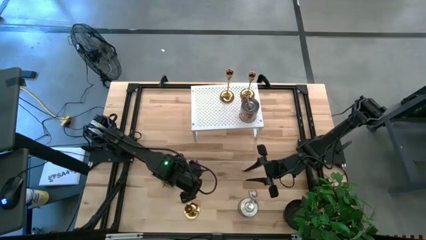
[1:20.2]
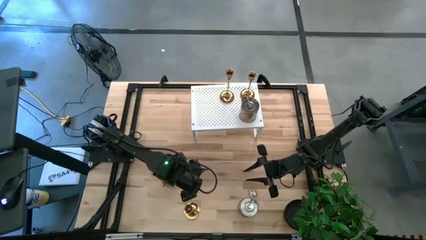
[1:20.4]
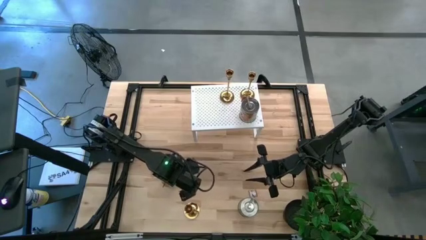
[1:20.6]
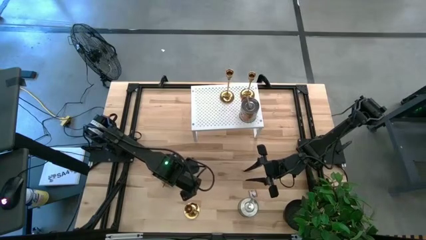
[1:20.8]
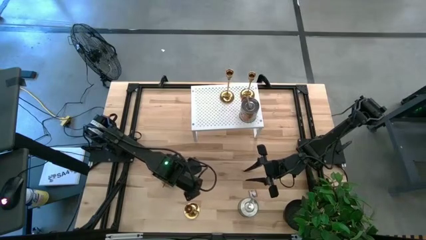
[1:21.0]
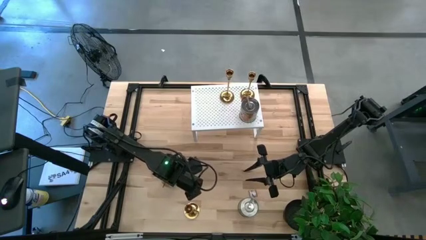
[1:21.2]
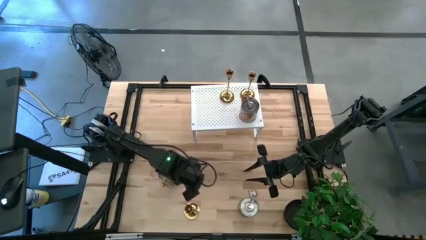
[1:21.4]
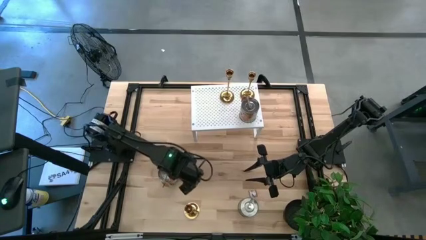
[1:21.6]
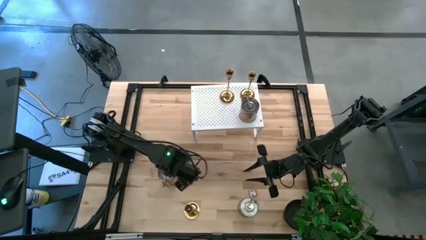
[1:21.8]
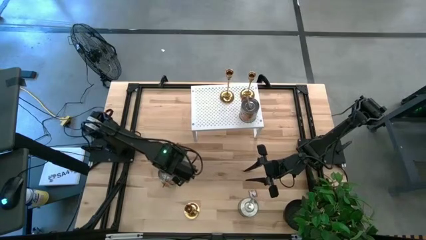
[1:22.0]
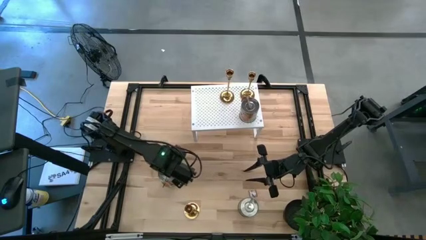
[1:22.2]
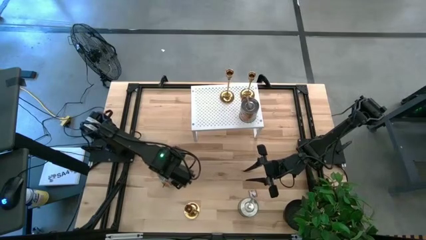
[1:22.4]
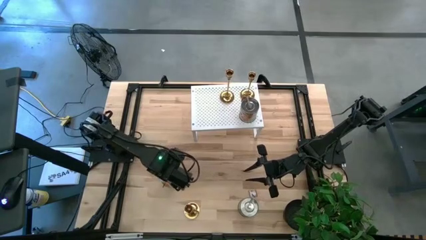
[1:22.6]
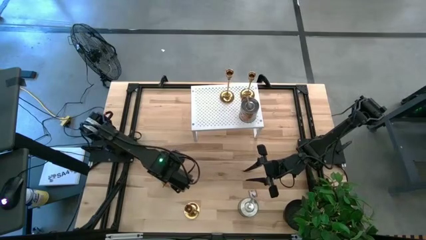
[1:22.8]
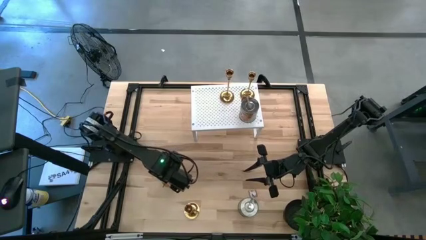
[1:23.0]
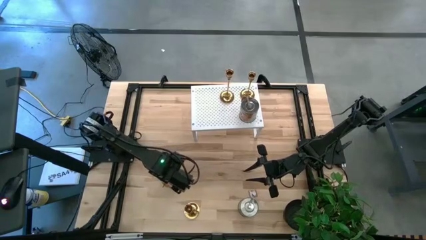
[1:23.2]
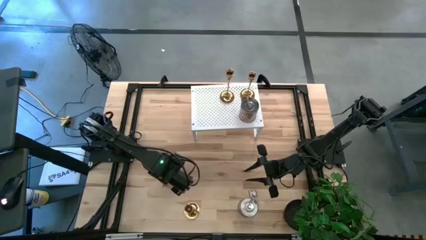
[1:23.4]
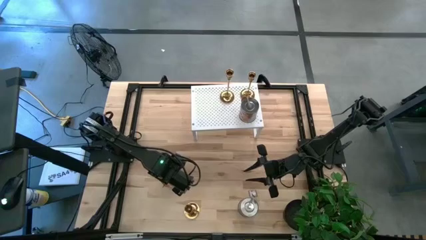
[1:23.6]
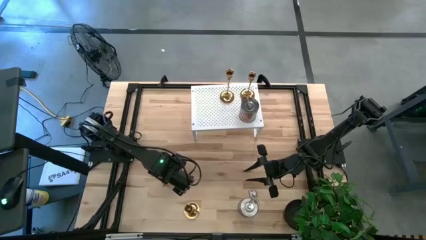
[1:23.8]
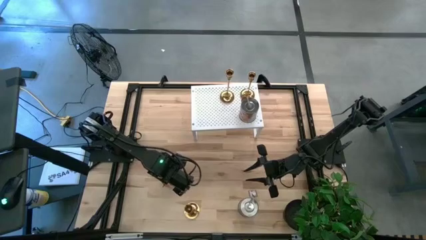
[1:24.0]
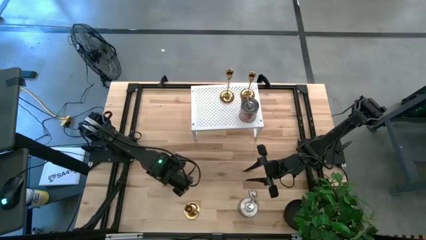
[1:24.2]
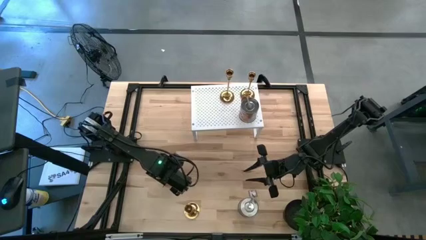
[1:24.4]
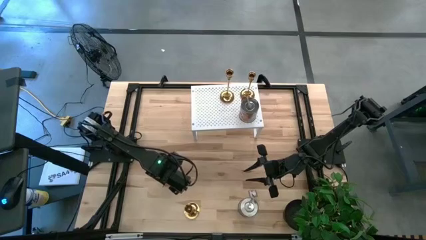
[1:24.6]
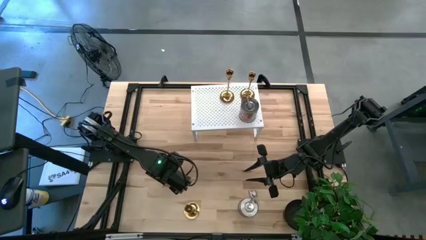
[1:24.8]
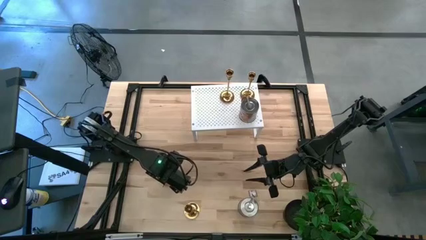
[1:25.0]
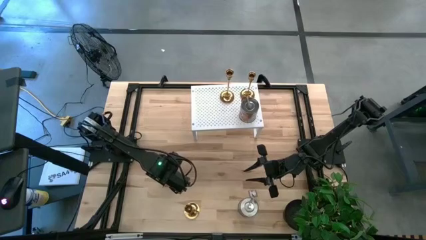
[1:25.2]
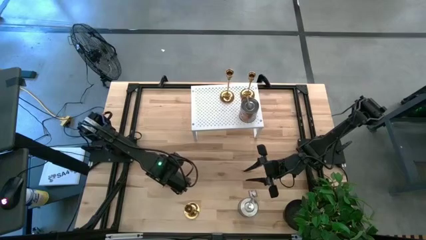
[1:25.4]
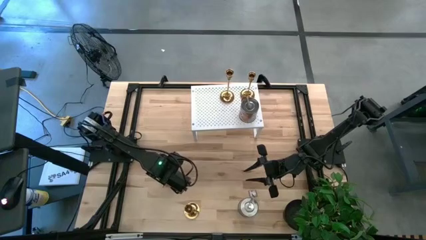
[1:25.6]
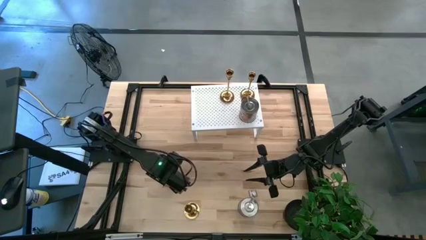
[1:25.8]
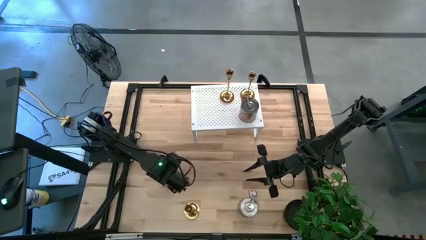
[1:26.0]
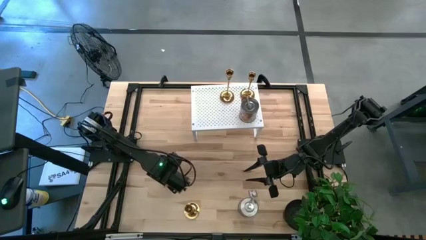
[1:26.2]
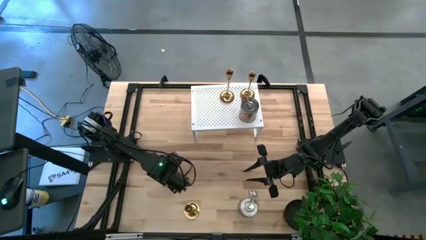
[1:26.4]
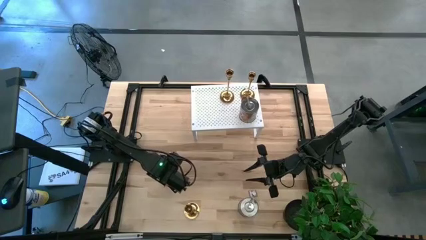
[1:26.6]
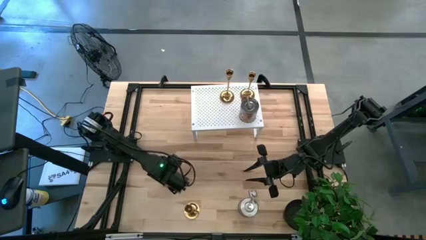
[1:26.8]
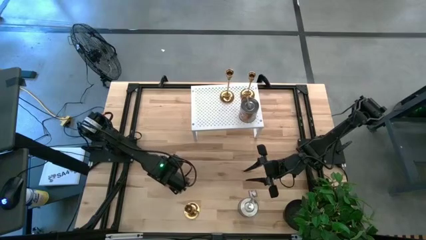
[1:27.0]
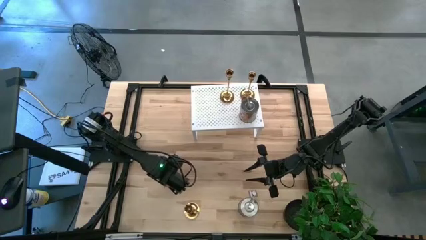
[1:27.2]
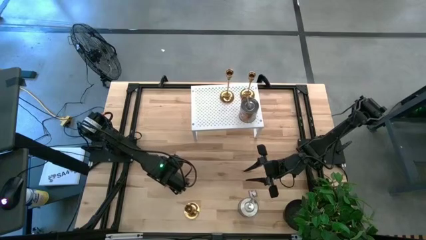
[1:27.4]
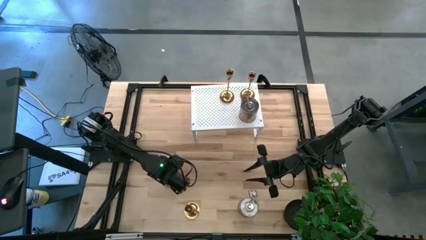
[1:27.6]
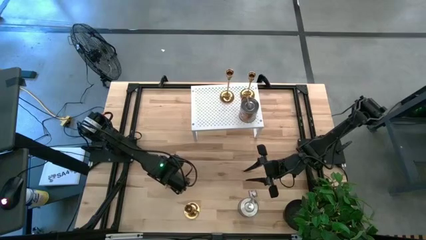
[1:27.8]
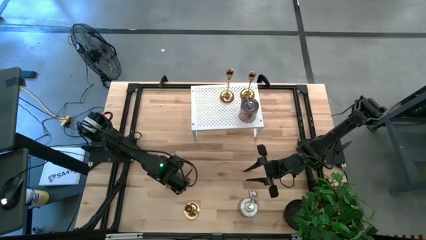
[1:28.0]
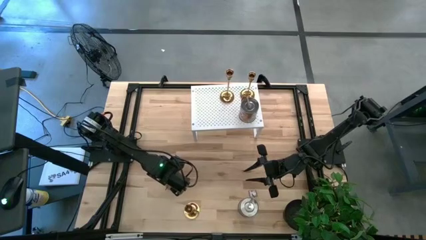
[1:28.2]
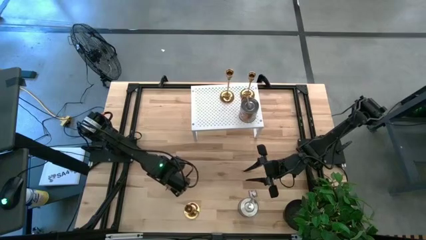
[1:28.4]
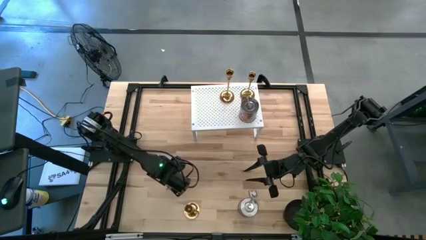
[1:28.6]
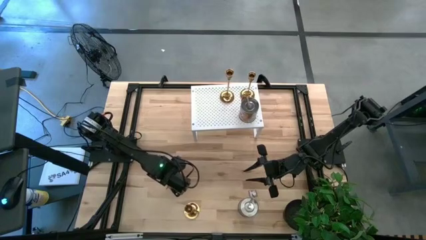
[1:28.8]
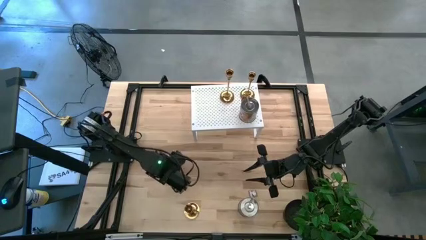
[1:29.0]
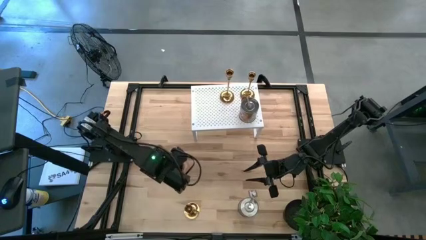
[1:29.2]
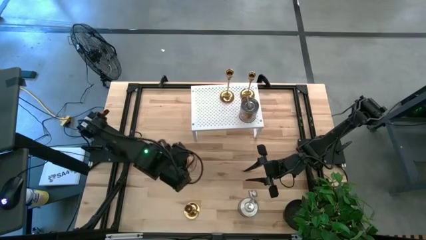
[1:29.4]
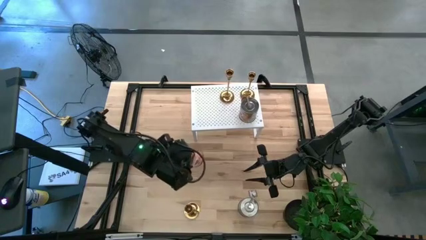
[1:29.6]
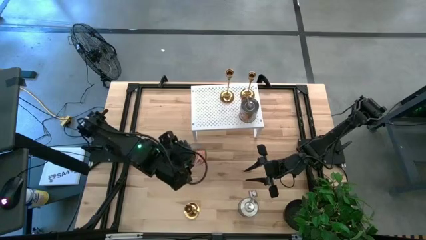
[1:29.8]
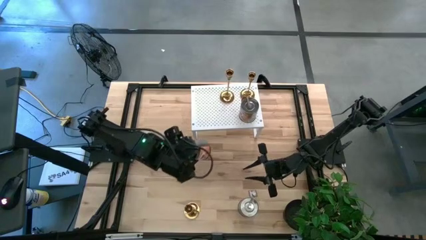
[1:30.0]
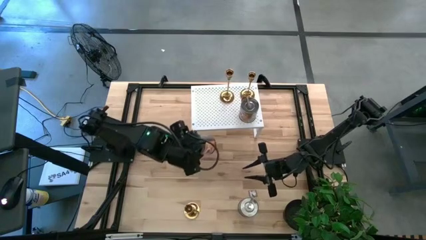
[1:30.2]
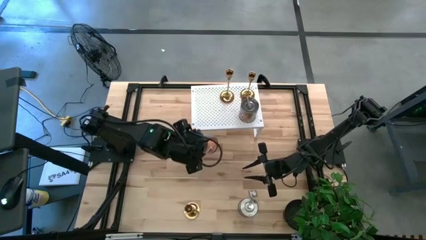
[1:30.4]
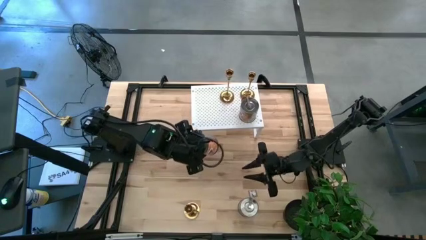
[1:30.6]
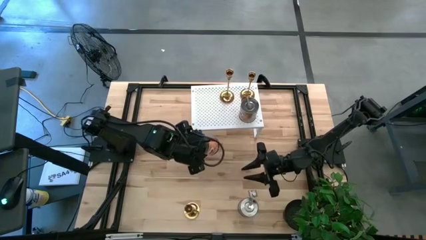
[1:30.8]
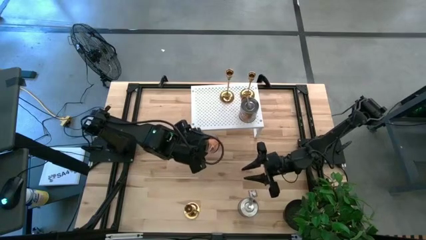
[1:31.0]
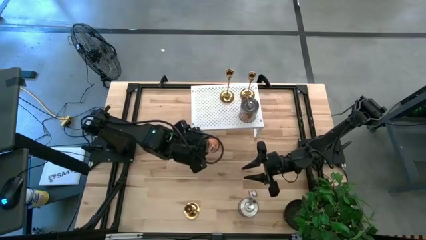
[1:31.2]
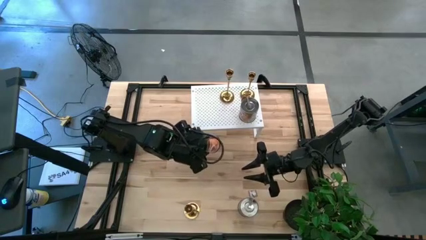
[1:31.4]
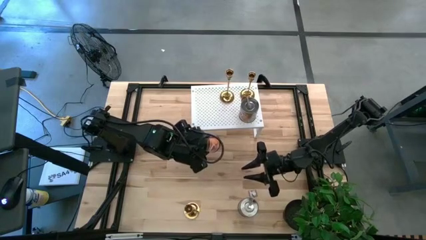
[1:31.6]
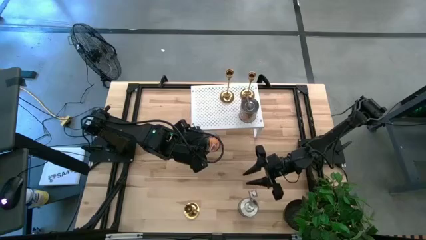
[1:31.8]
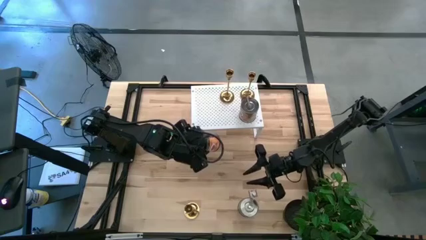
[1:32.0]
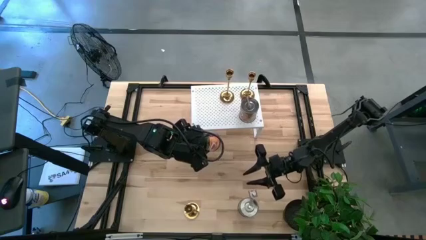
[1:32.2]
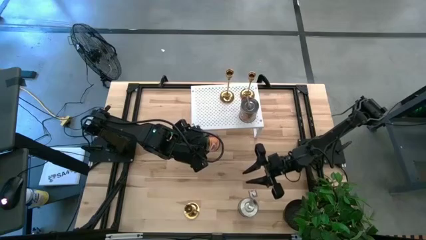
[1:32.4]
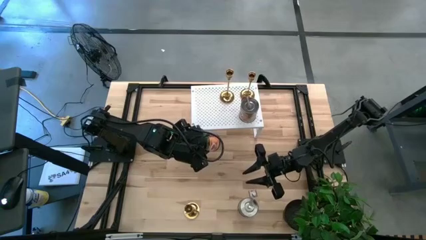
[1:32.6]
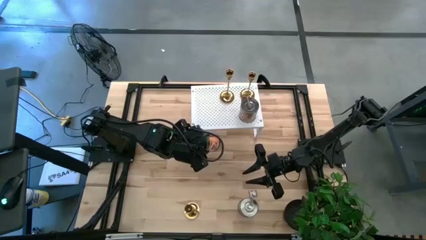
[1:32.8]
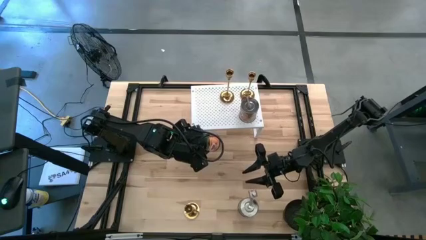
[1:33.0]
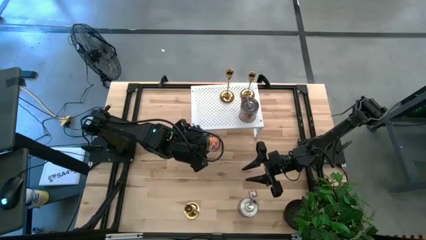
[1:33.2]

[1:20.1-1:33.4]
Task: Pick & Place candle stick holders
Put the left silver candle on the shelf aligned with the other silver candle

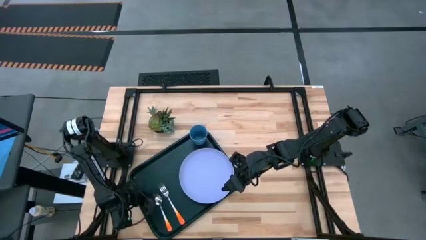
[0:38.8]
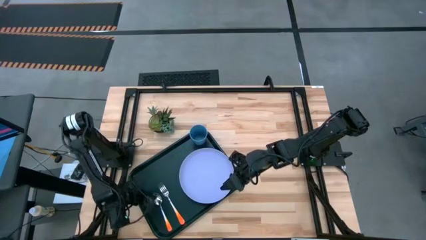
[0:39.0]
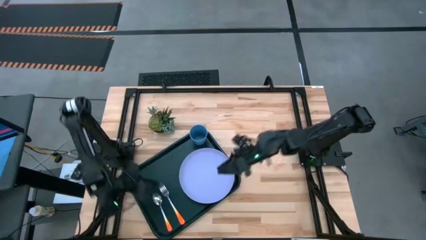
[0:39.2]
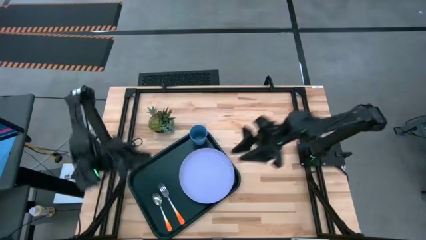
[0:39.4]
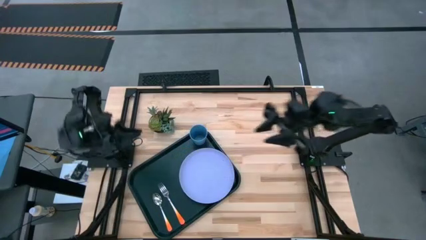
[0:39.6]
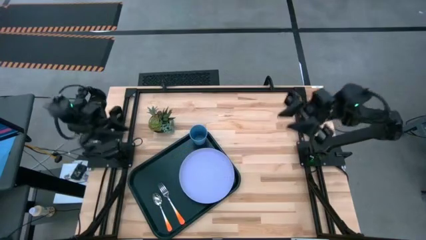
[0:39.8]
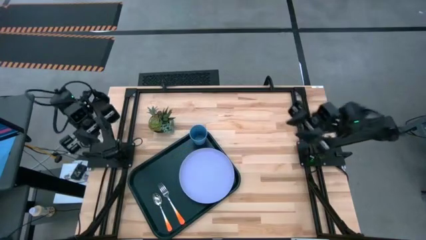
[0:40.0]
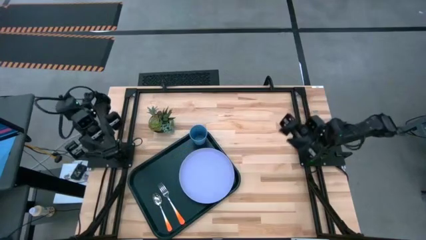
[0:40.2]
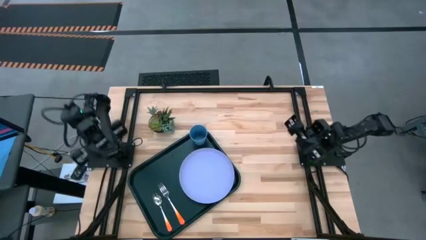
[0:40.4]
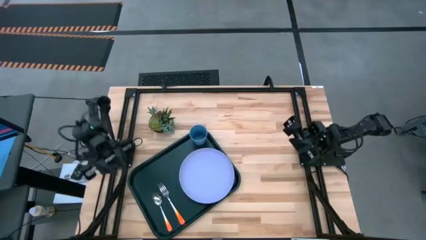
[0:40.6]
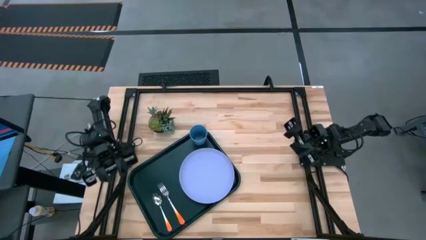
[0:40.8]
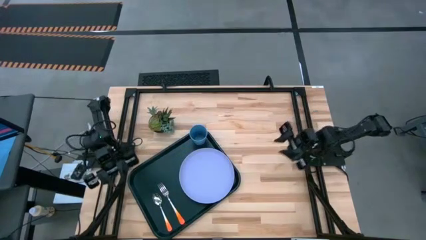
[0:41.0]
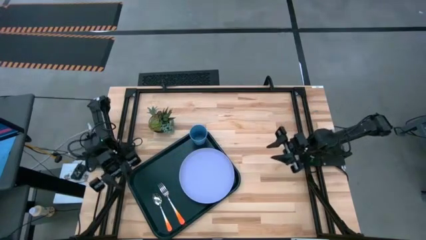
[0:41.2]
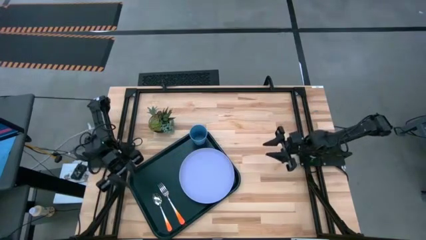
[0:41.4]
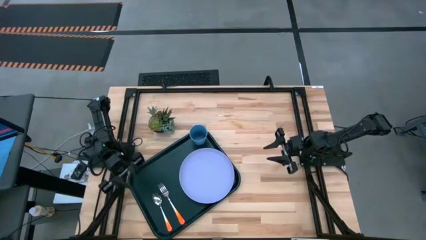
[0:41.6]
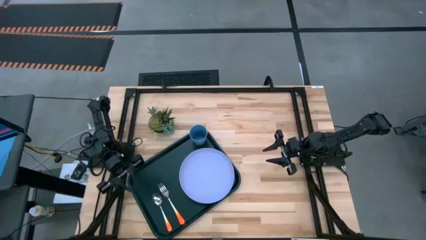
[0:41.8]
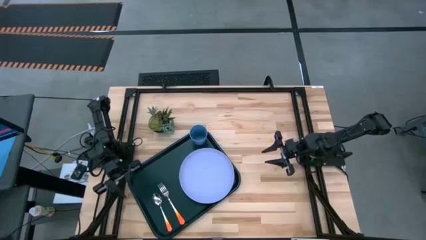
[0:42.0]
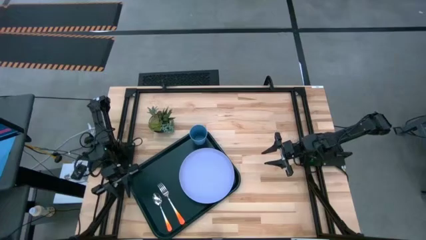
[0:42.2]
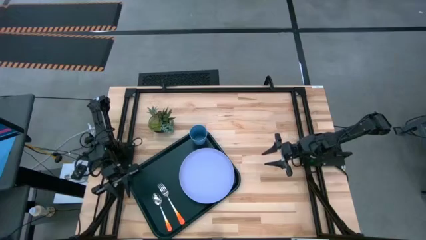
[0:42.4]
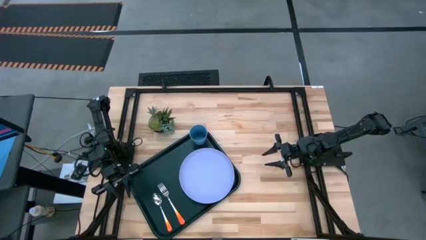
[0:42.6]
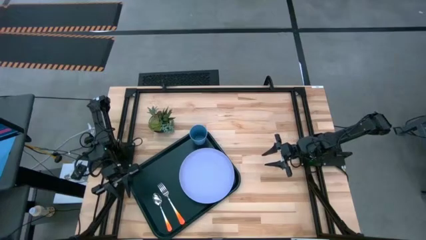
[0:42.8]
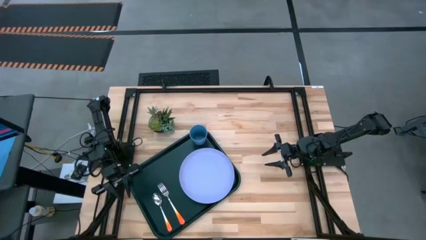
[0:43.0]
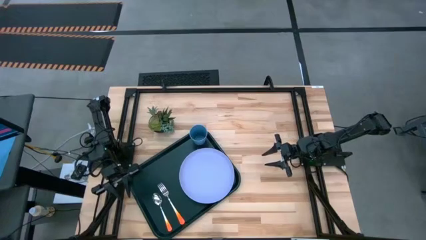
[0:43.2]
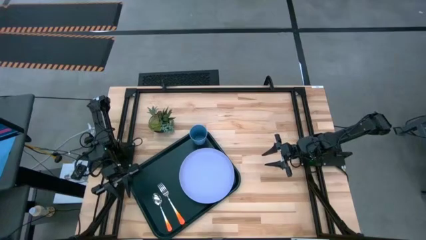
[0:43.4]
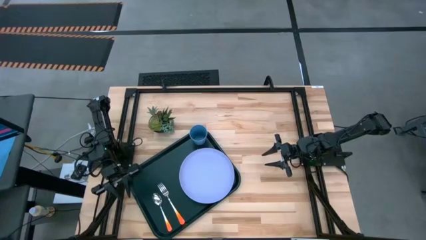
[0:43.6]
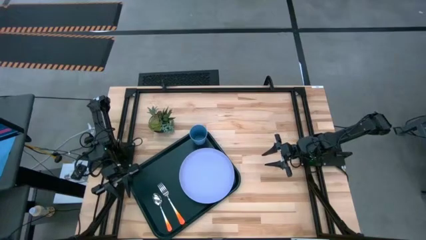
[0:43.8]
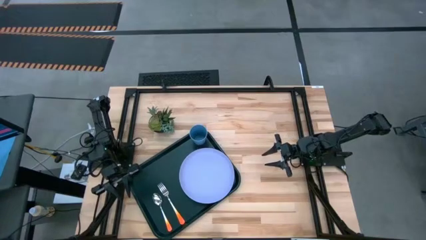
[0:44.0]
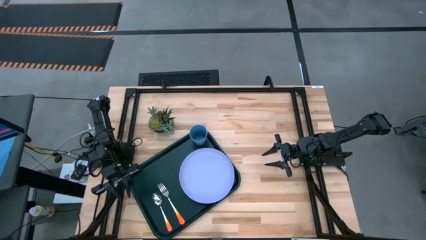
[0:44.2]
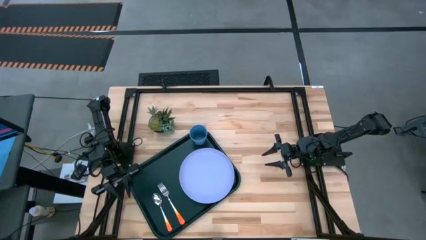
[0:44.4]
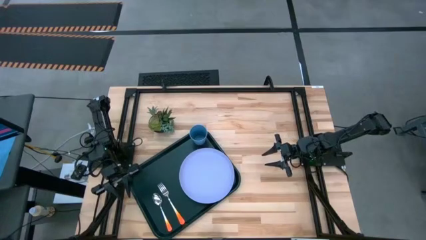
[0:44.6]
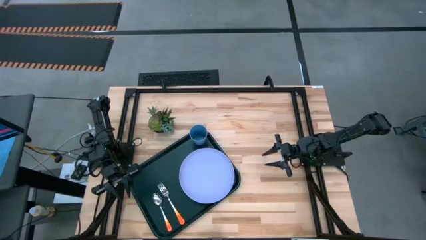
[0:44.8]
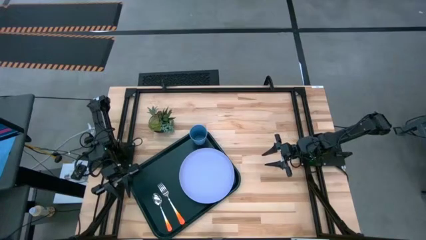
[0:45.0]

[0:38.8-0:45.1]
Task: Pick and place plate/cup/fork/spoon on tray
Return to Home Position
